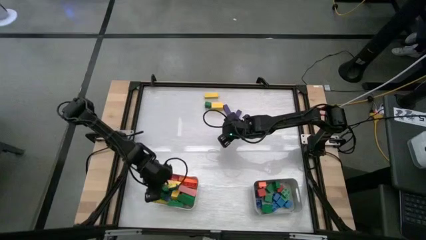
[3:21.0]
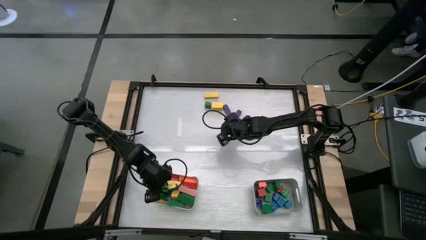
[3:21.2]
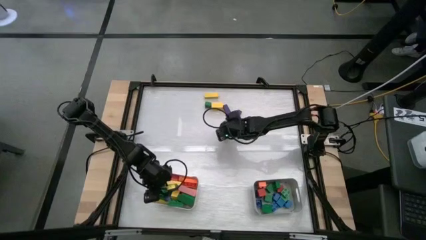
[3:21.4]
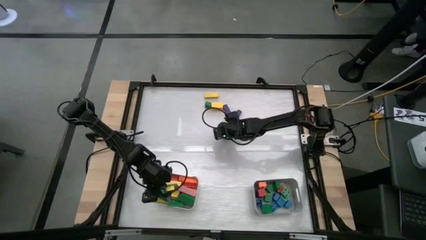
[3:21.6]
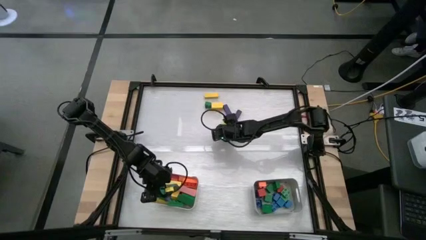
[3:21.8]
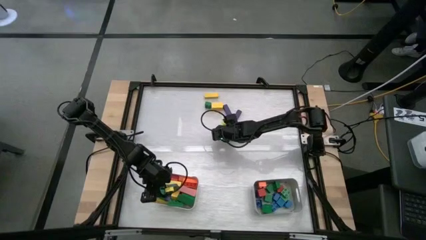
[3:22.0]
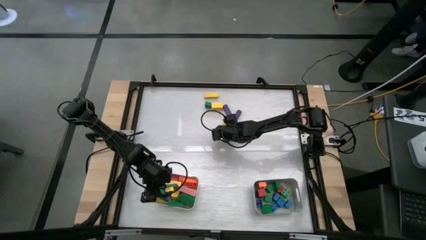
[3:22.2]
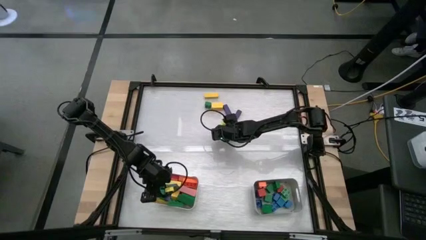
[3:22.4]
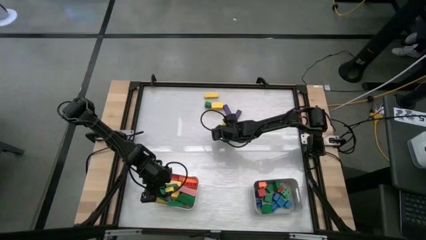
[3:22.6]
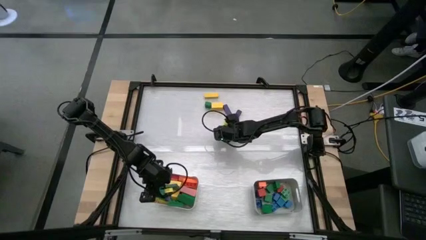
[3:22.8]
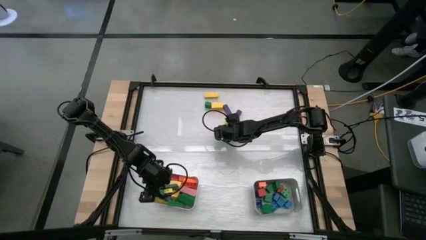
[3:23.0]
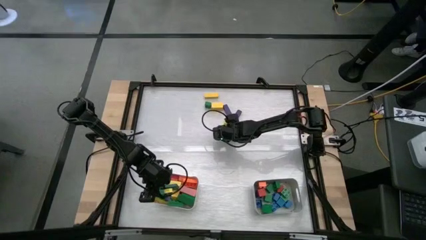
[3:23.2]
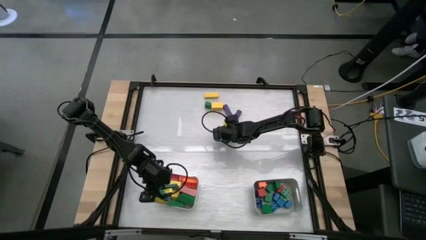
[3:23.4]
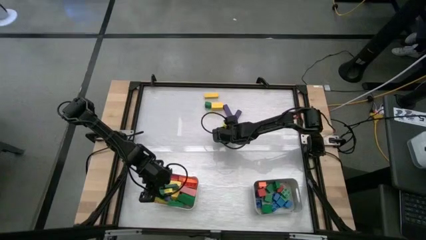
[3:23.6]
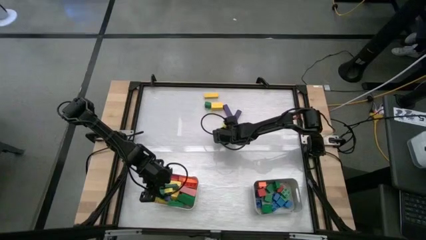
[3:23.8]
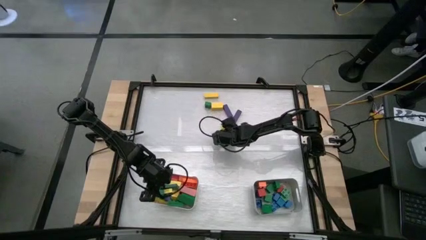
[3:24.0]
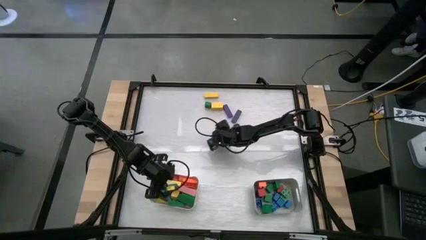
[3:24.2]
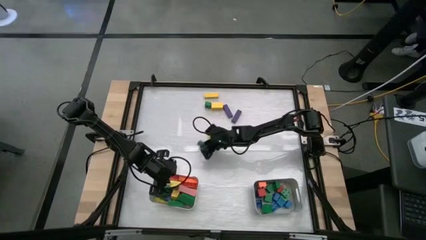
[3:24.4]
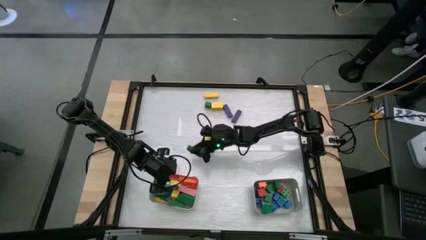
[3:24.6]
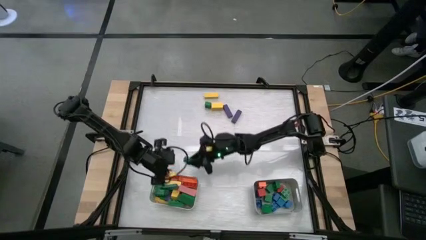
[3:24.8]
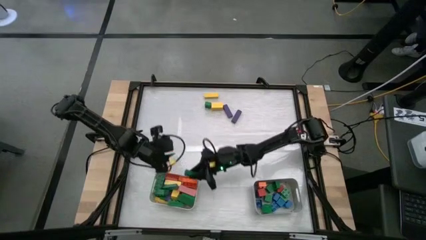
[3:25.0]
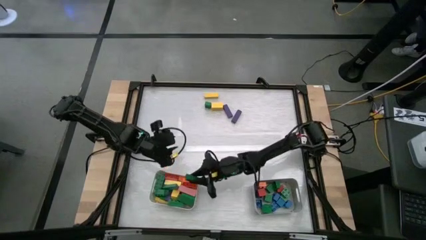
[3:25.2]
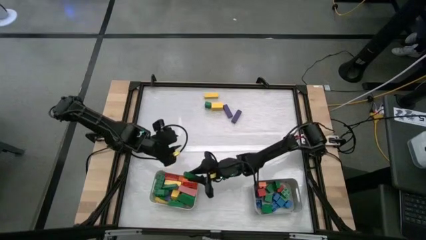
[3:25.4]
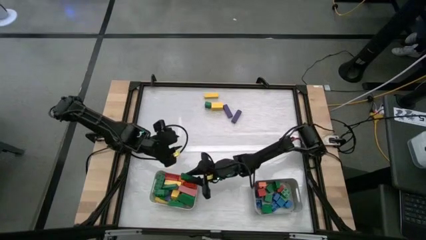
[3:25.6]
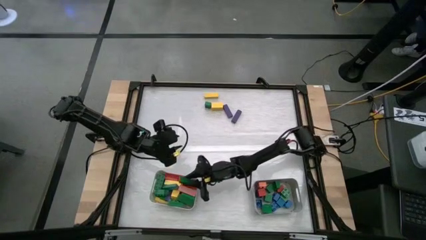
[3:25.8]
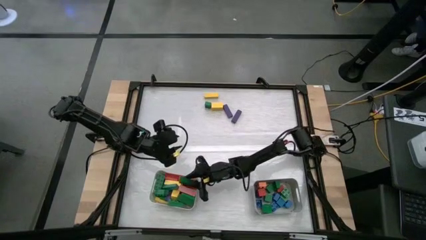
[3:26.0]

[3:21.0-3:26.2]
Task: Sort blocks by size
Put the rectangular green block into the white bin

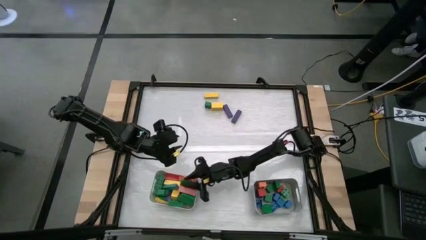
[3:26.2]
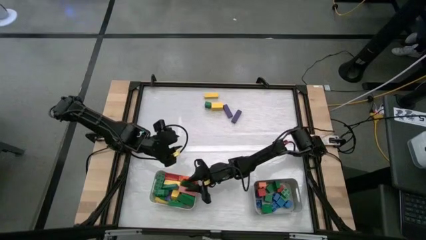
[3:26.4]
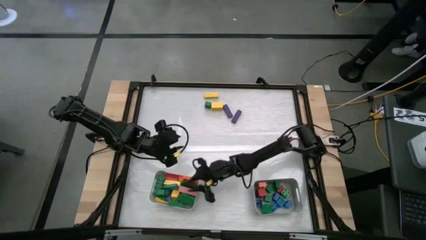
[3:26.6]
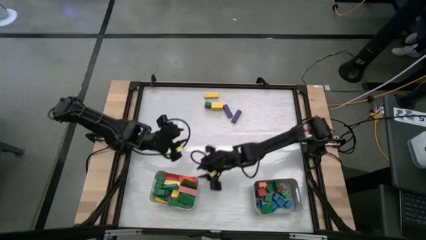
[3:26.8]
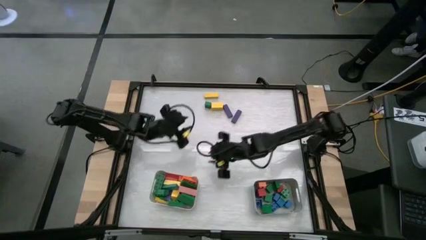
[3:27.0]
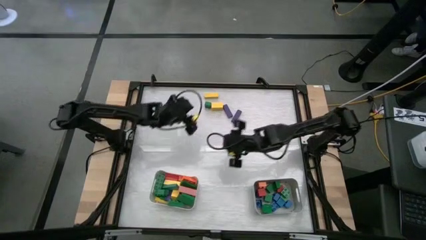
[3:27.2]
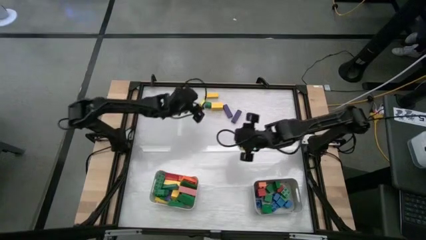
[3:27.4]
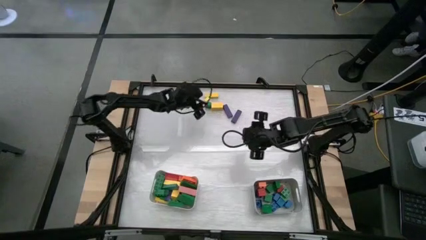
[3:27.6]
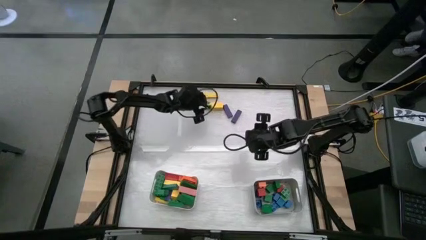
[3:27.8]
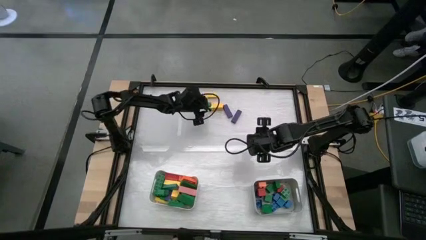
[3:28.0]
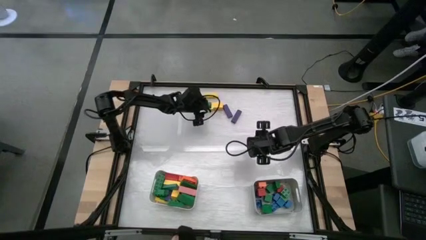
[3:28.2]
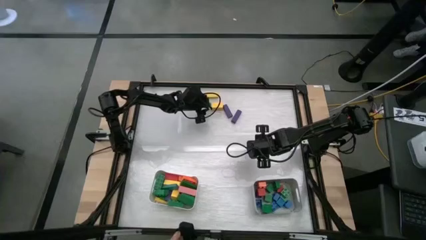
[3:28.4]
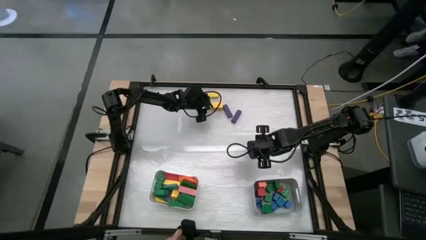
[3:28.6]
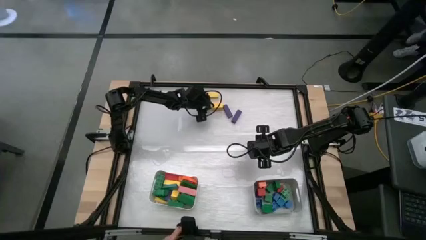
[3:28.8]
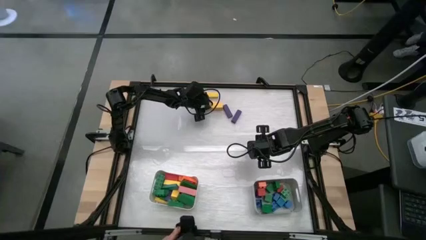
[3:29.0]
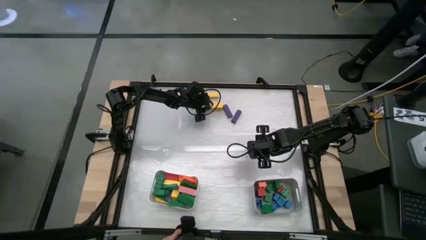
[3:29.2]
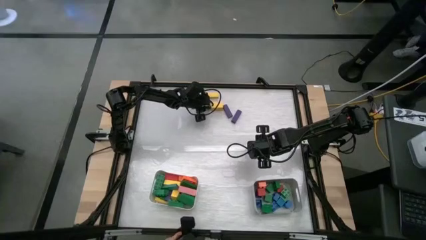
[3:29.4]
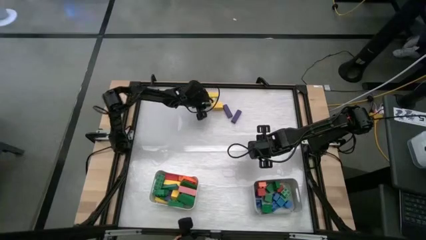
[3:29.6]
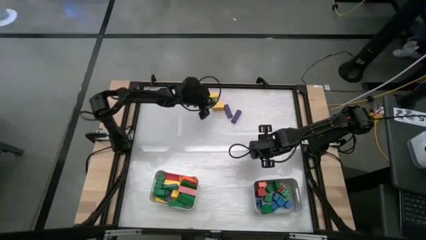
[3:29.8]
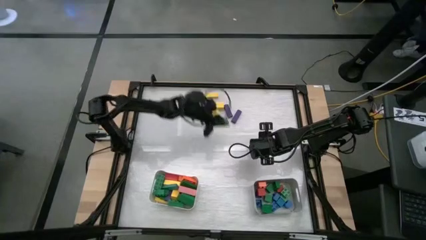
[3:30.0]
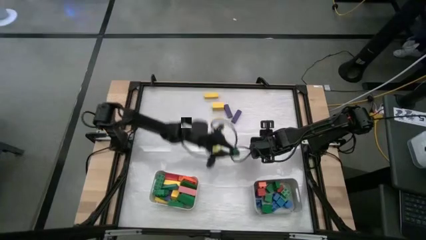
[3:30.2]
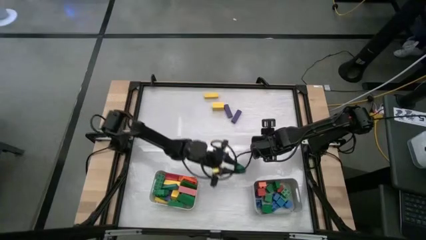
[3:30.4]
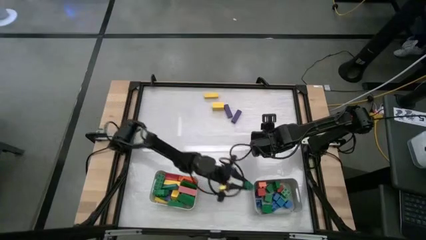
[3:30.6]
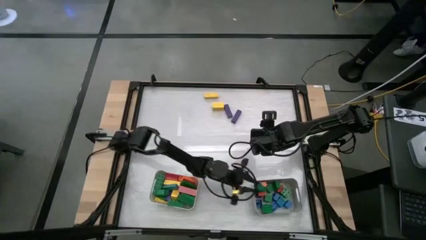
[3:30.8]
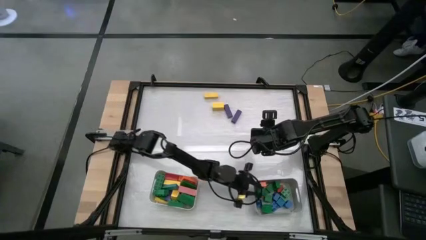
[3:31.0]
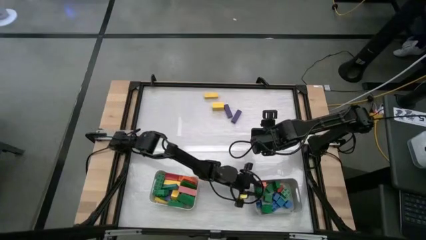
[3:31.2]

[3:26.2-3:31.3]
Put the square green game piece into the gray bin

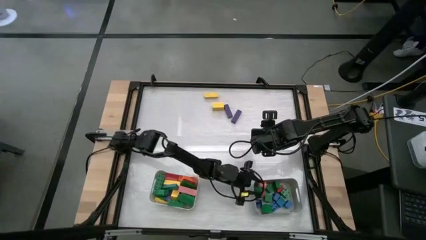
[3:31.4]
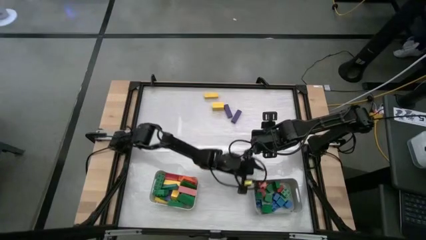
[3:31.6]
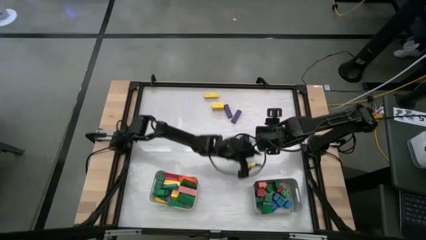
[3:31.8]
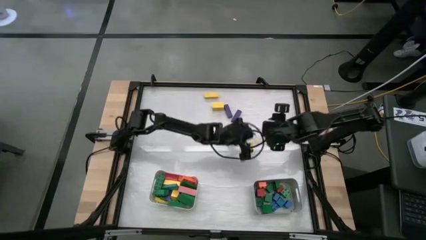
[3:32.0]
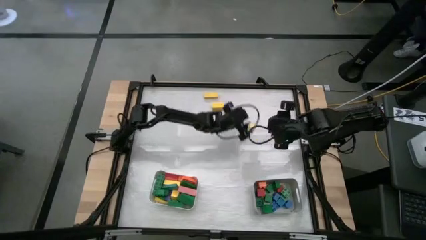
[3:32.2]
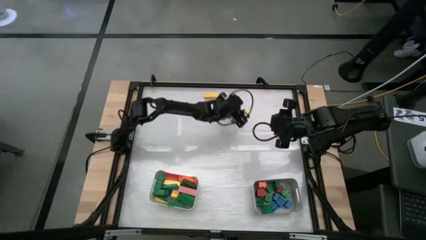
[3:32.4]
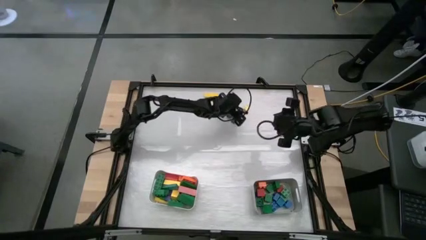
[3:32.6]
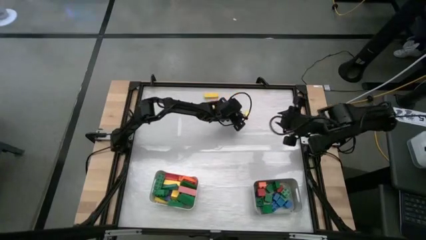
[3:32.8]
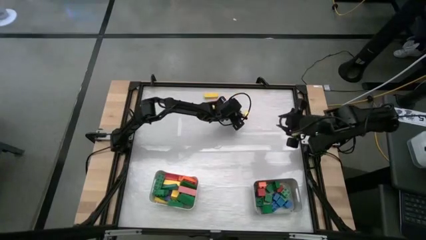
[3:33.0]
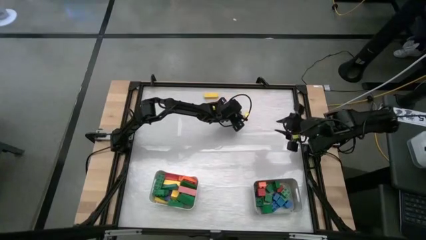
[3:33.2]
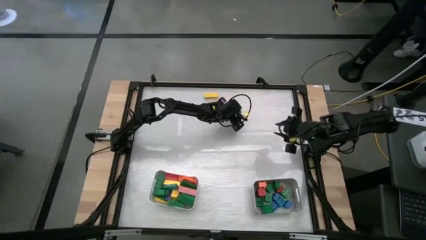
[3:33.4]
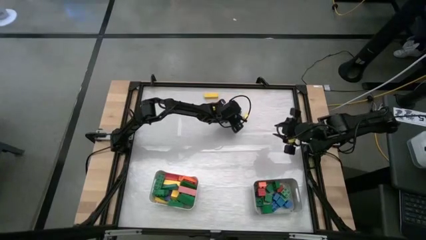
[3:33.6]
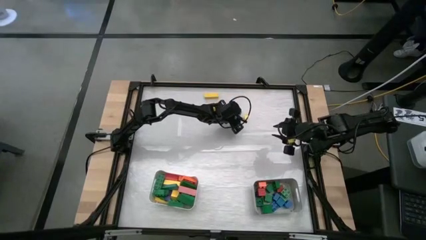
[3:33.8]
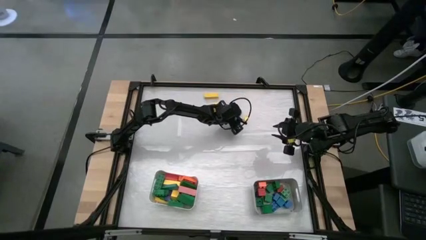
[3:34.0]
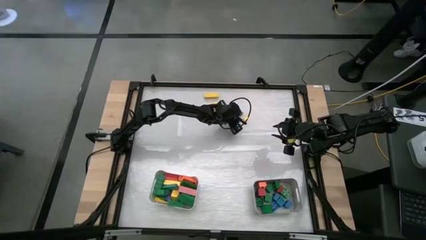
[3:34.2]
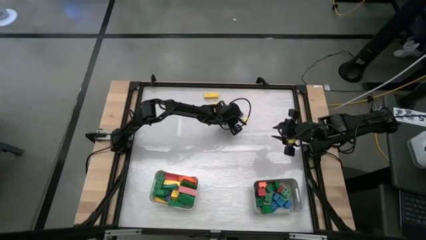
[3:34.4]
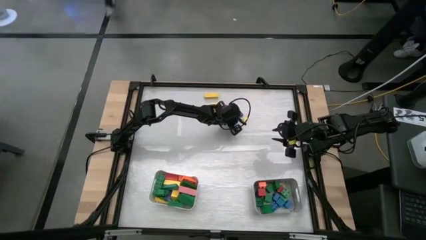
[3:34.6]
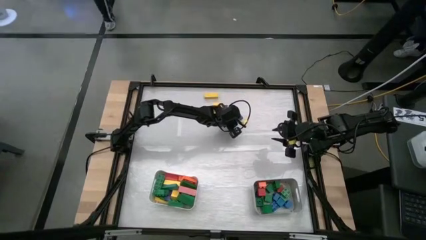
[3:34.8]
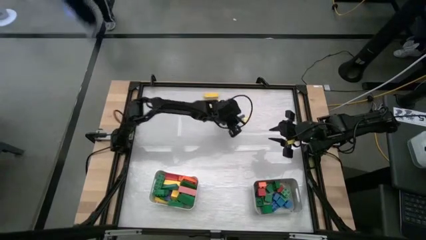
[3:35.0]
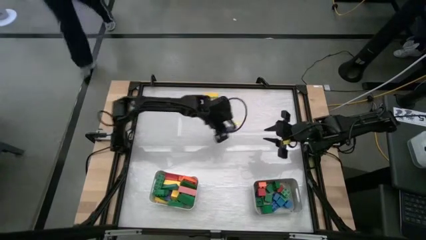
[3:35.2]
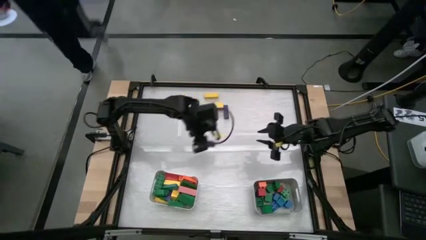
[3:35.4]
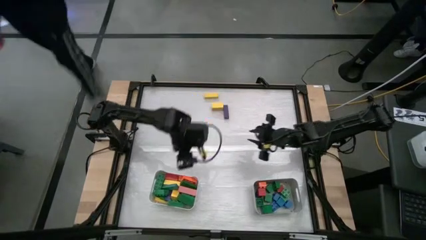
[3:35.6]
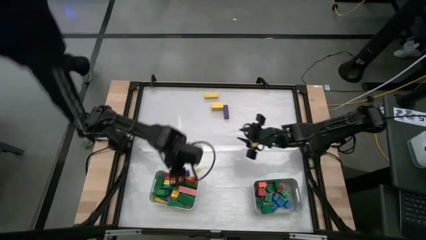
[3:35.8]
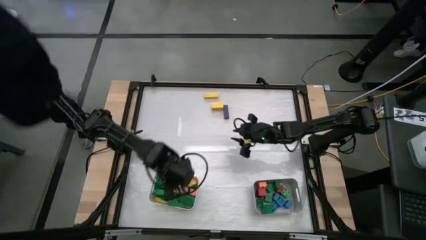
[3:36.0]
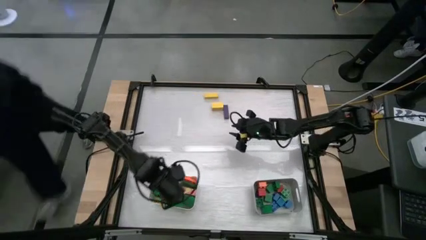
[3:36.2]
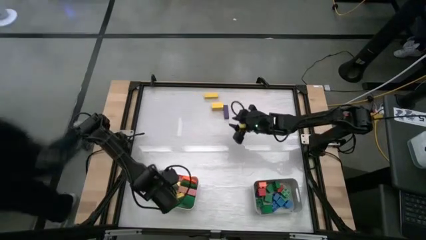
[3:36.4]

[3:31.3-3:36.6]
Put the rectangular violet block into the white bin
